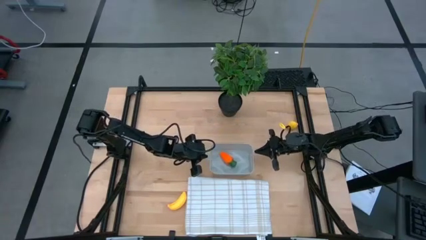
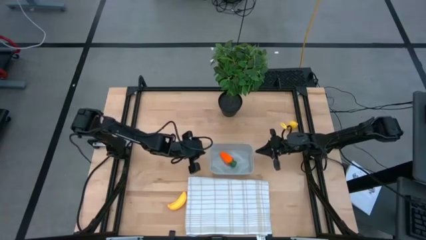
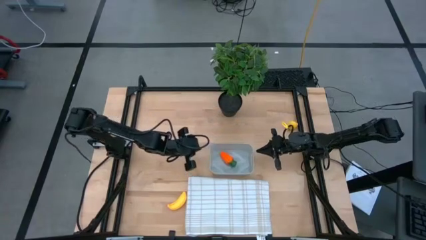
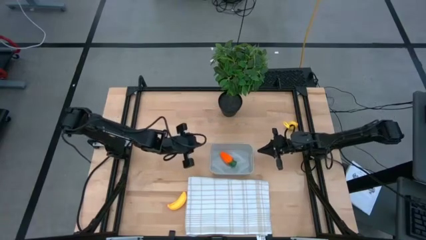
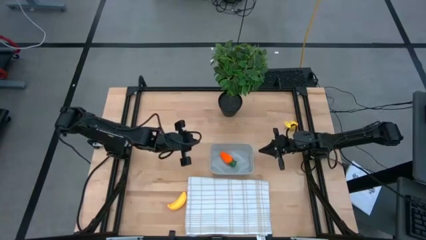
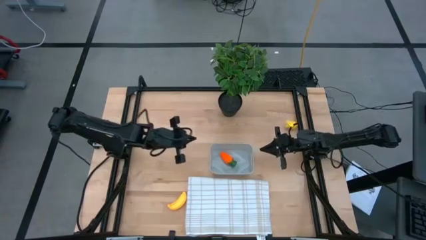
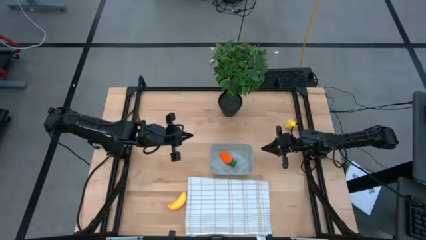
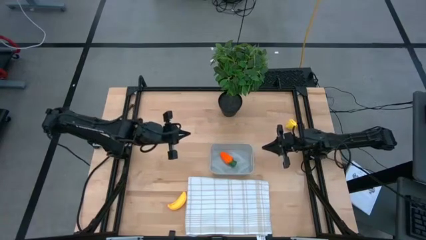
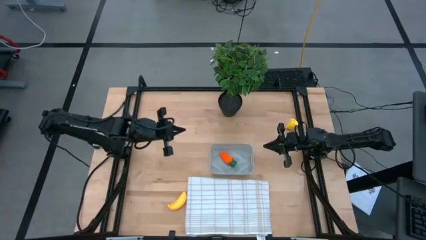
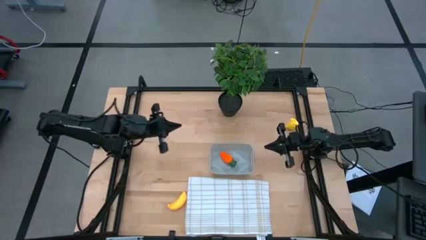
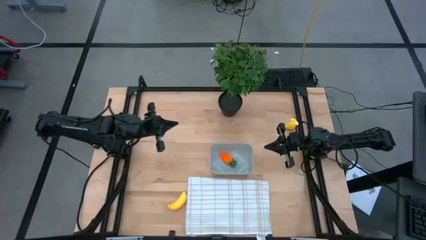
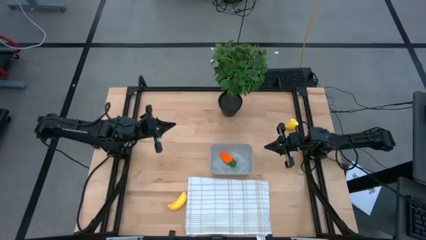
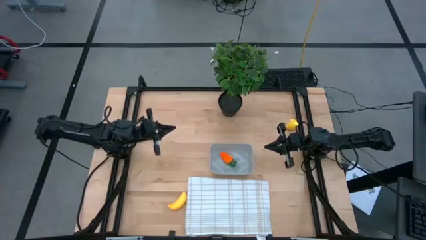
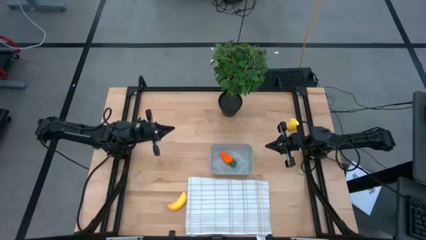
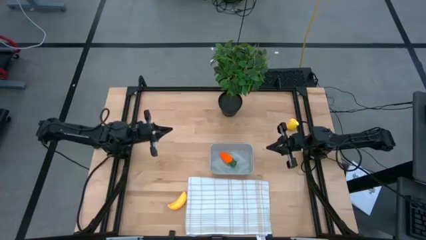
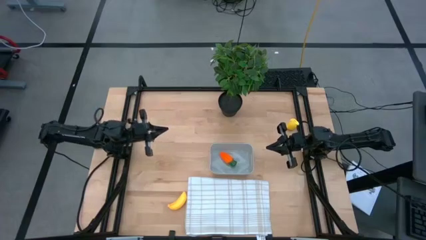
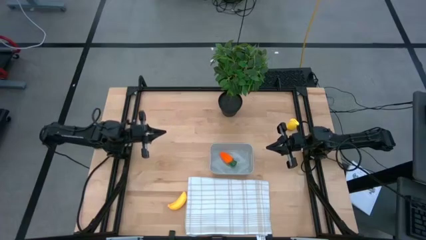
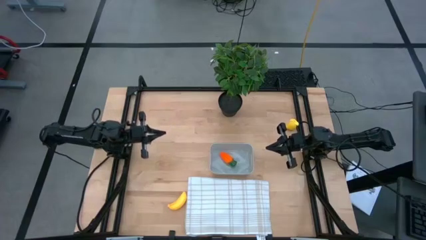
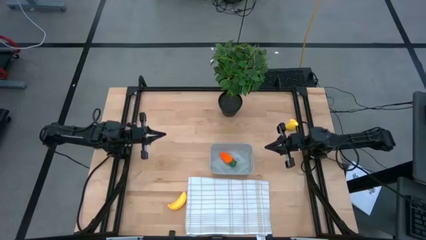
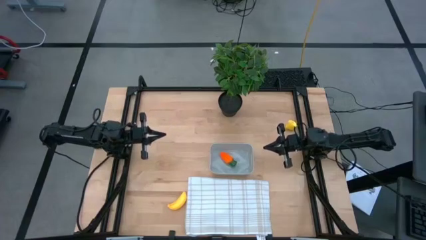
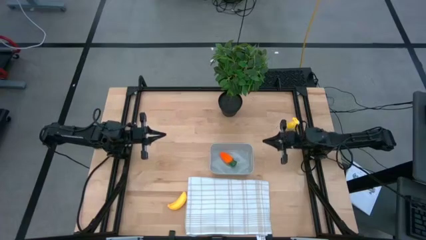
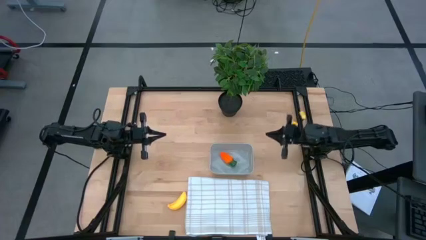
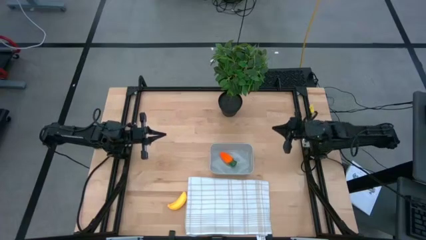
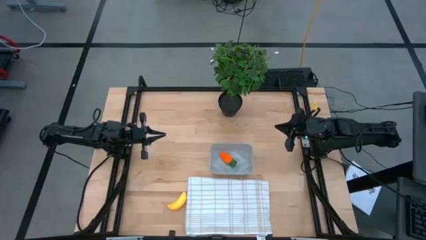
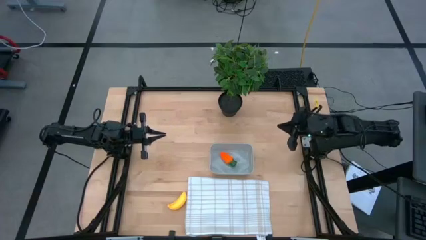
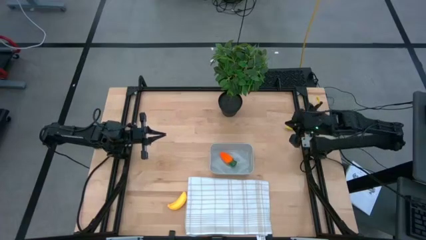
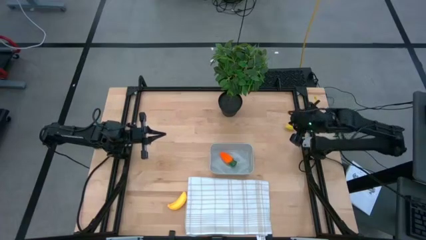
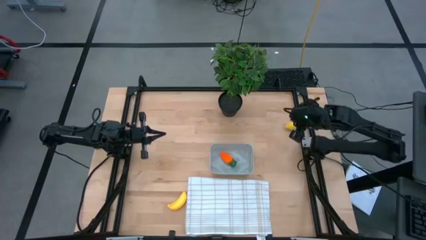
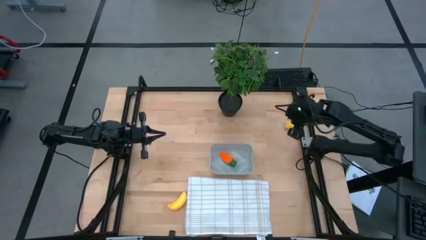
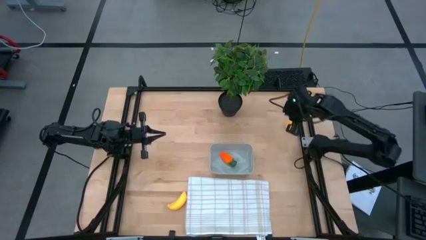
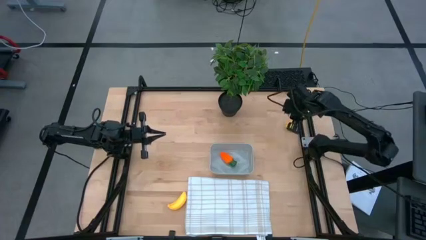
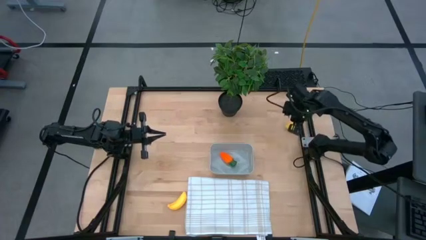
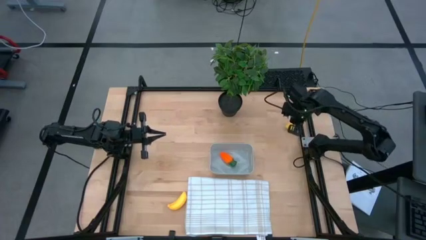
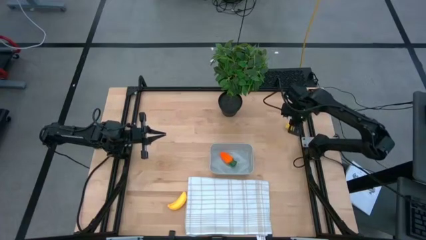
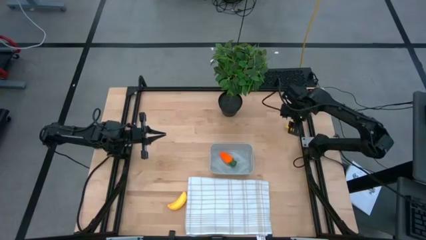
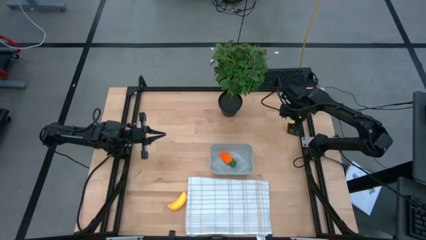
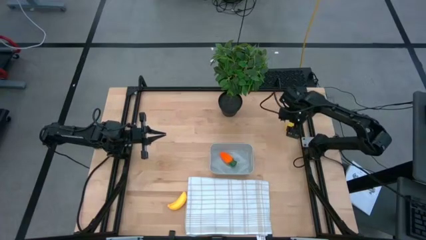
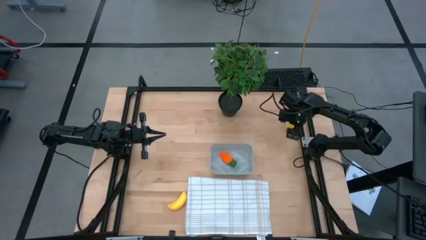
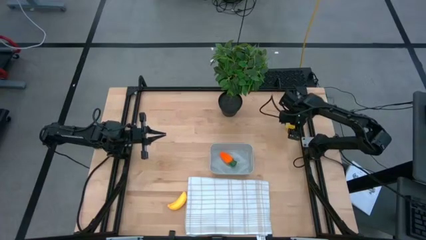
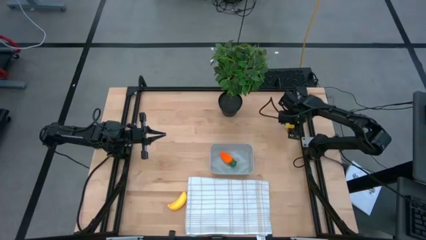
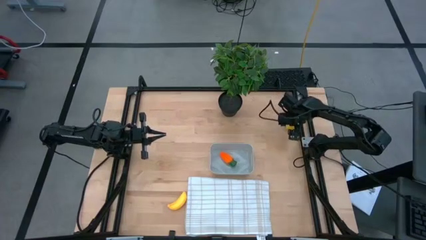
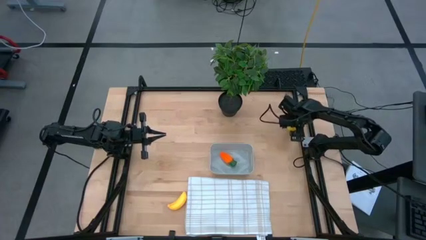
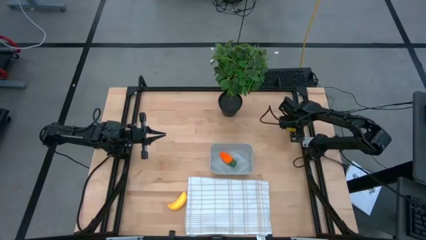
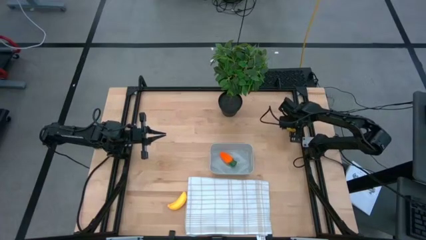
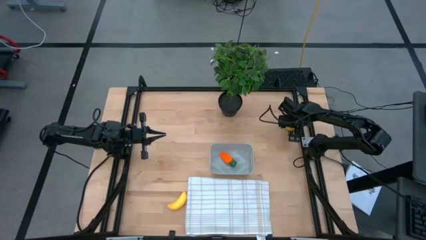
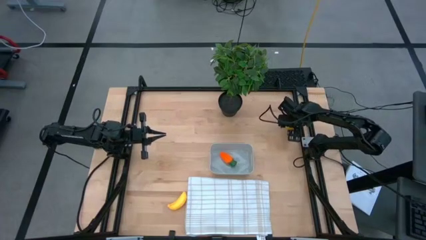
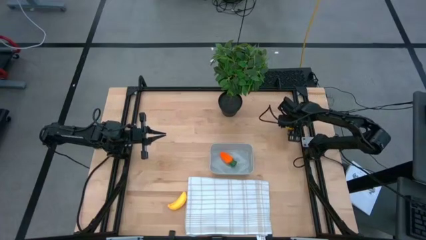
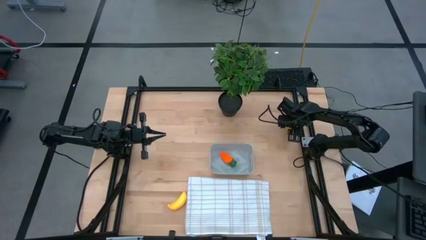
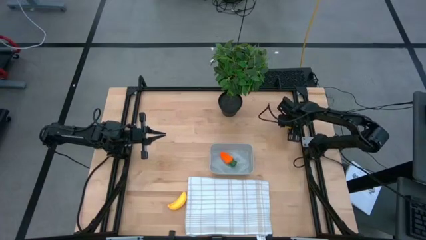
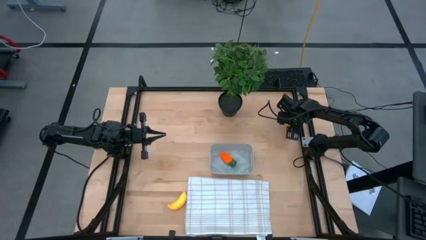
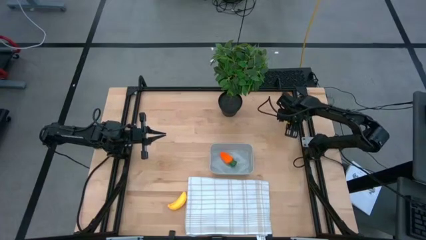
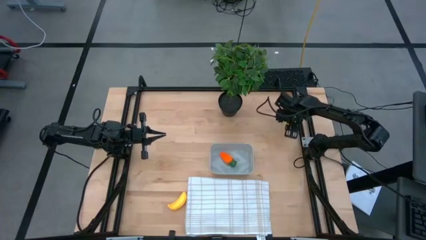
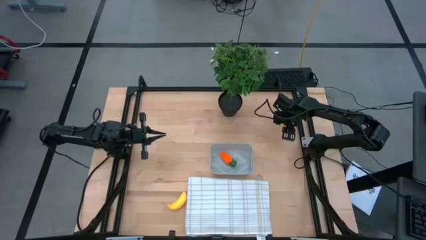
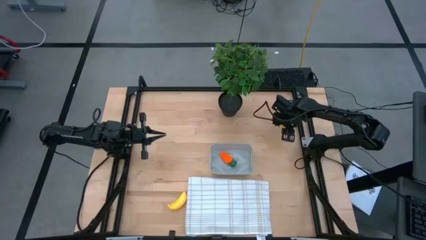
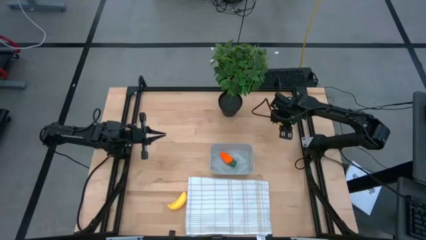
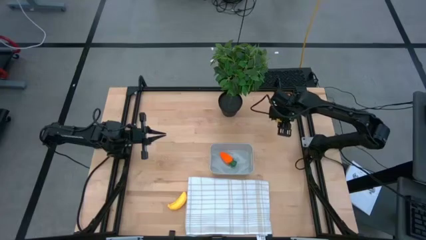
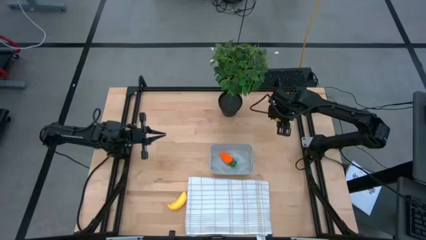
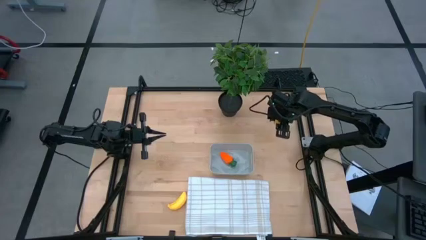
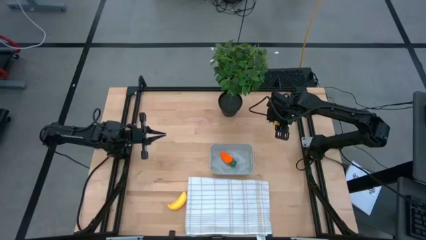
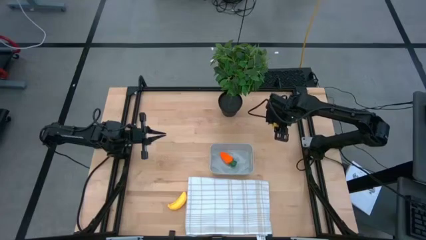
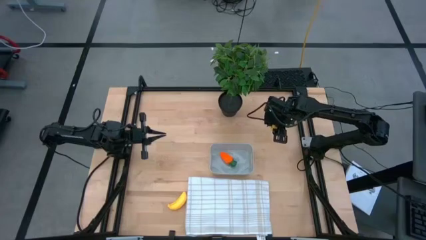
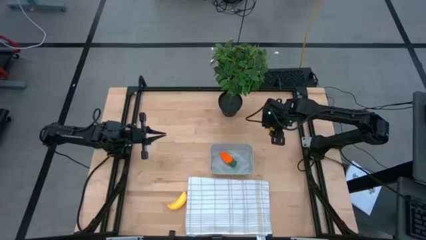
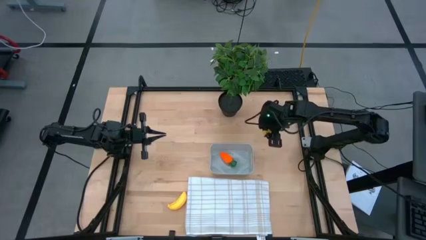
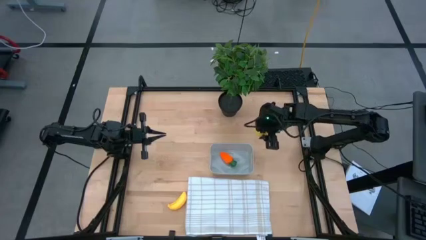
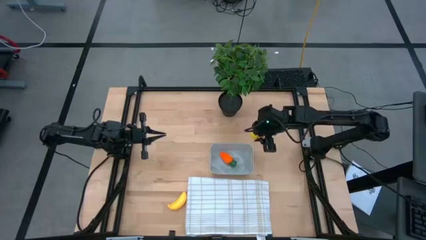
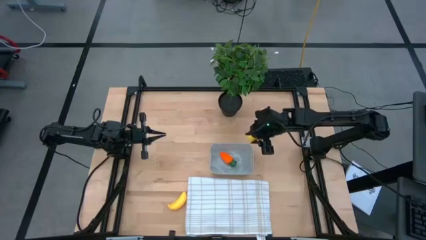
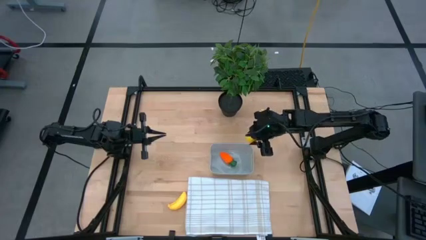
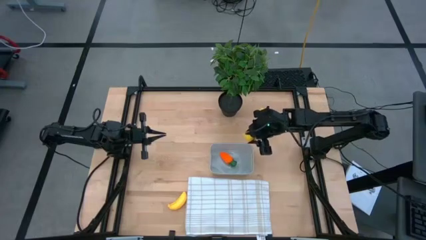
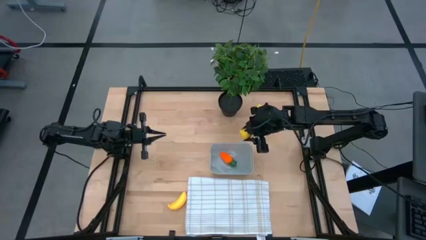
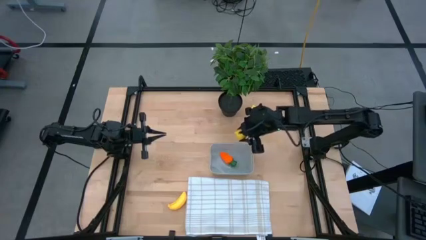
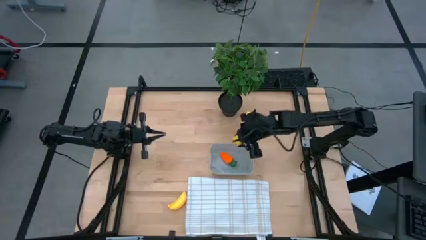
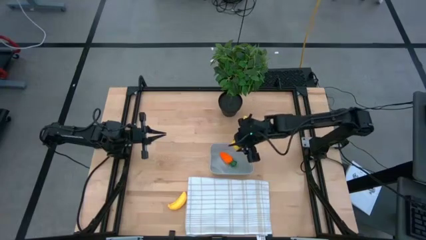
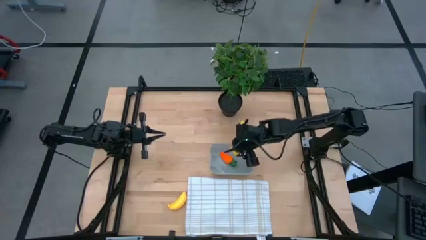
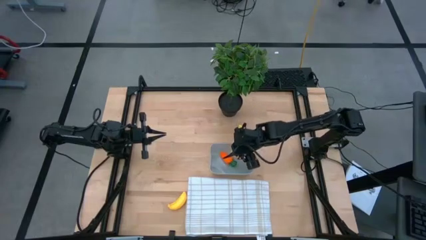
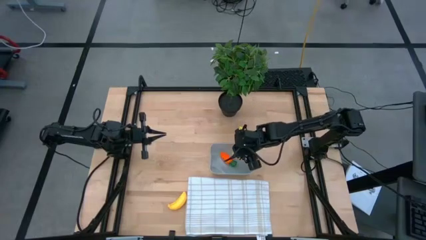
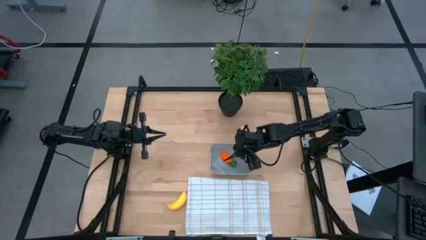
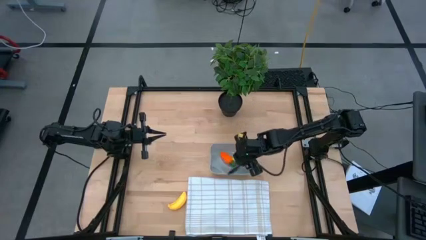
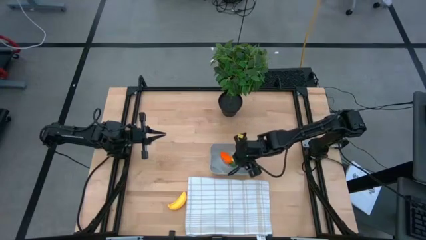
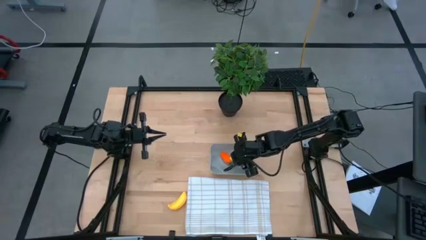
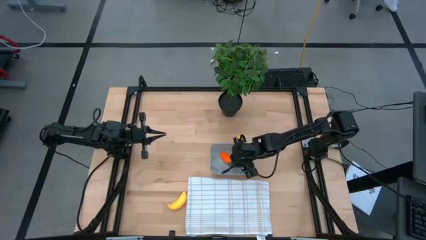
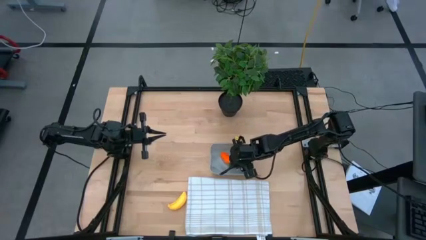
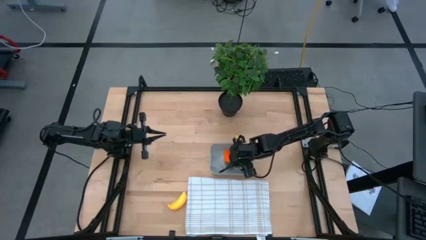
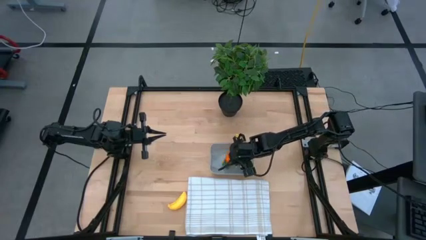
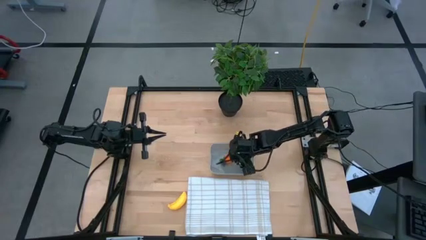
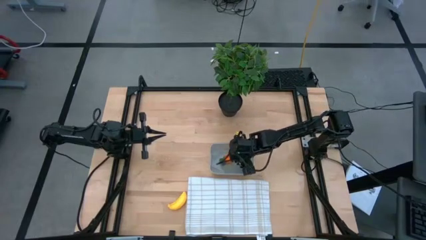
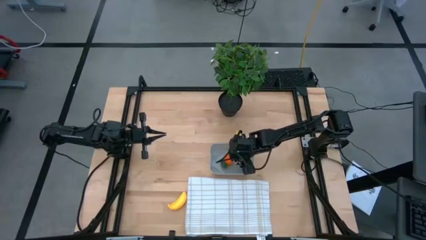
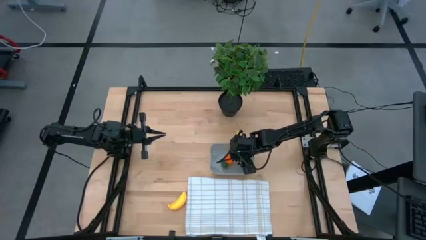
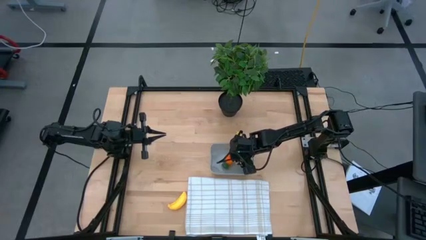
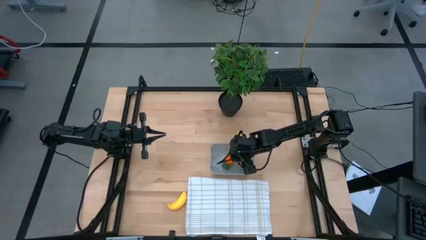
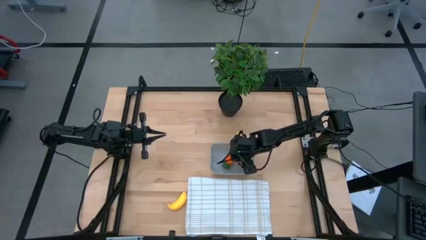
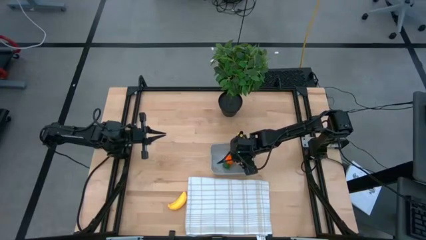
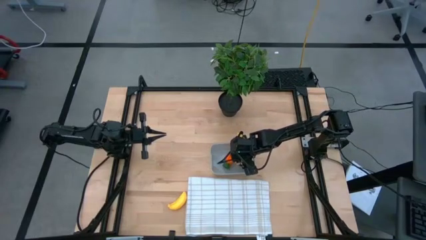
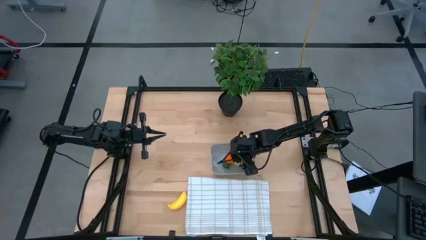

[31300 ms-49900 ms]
Task: Pick and placing Produce into tupperware
Put the lemon into the bin
